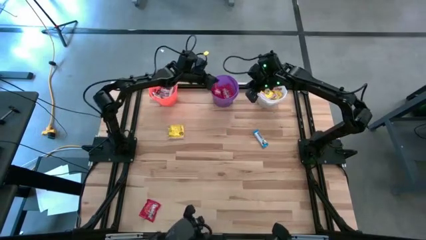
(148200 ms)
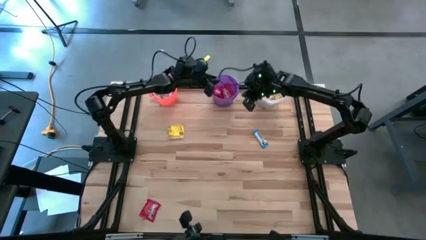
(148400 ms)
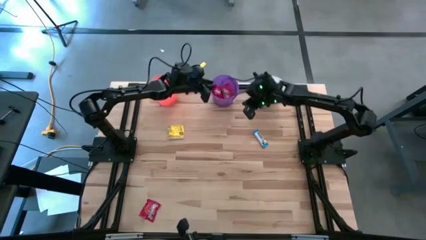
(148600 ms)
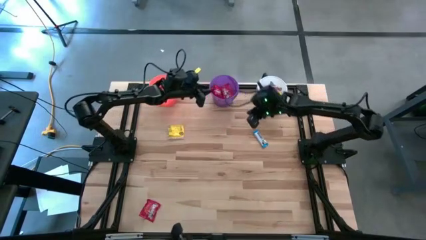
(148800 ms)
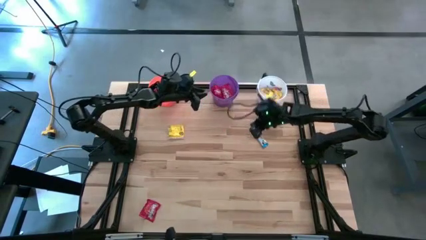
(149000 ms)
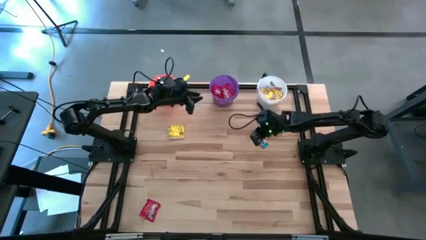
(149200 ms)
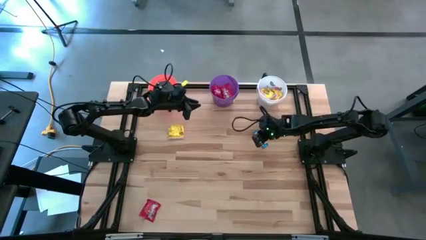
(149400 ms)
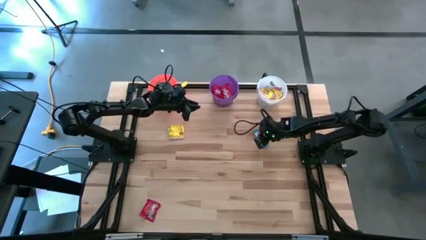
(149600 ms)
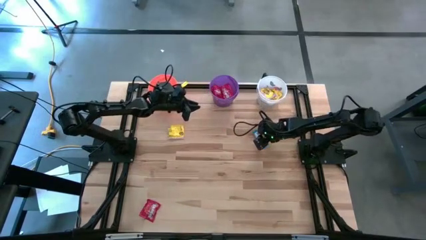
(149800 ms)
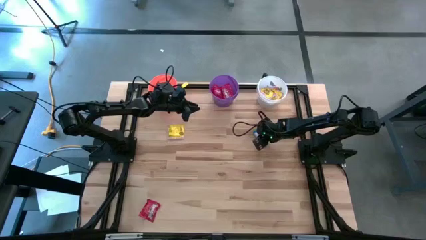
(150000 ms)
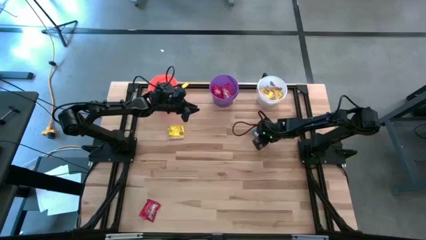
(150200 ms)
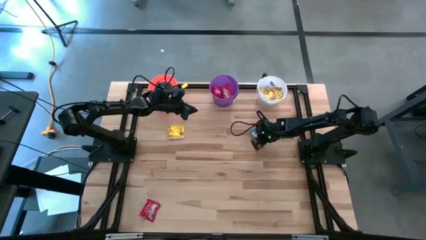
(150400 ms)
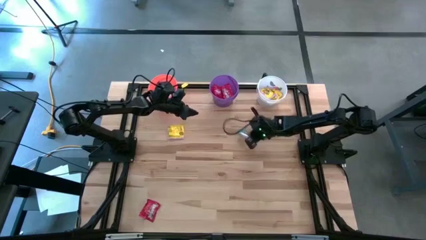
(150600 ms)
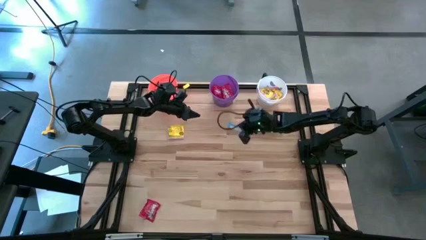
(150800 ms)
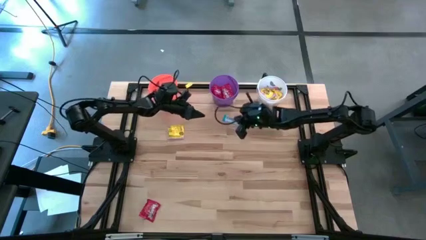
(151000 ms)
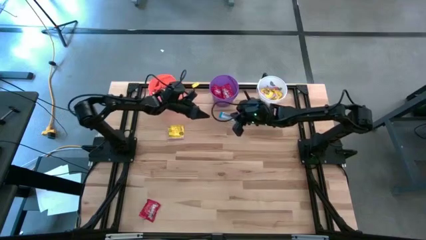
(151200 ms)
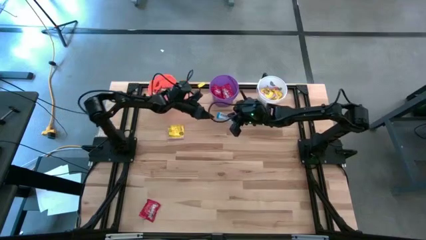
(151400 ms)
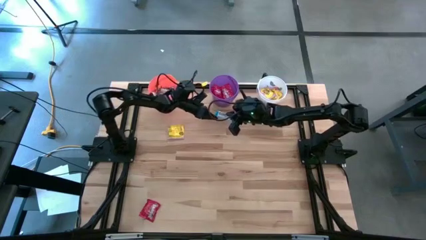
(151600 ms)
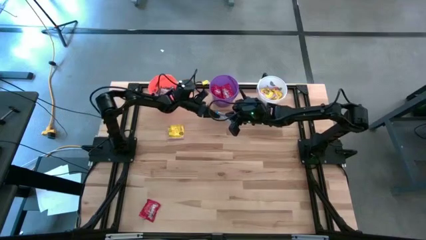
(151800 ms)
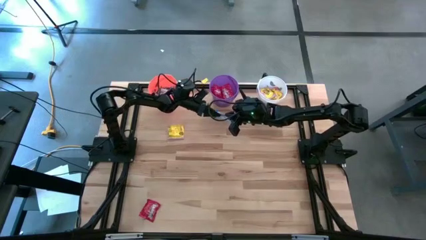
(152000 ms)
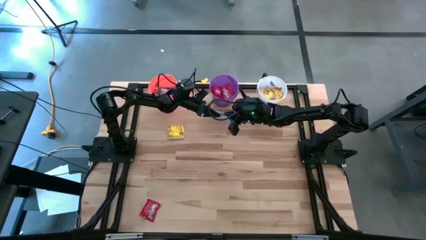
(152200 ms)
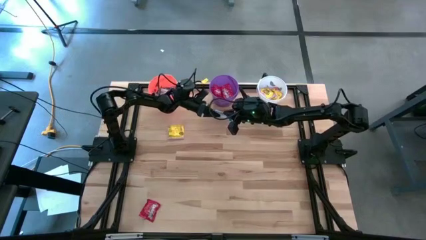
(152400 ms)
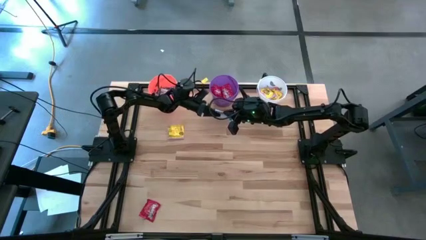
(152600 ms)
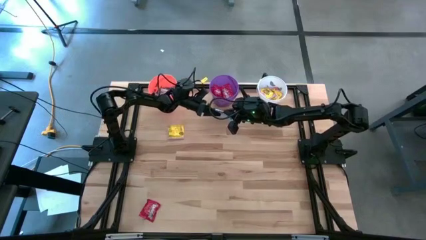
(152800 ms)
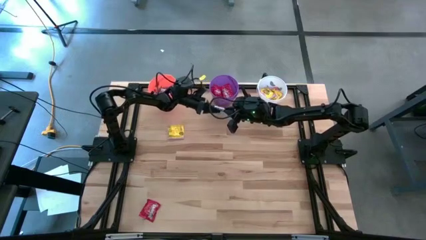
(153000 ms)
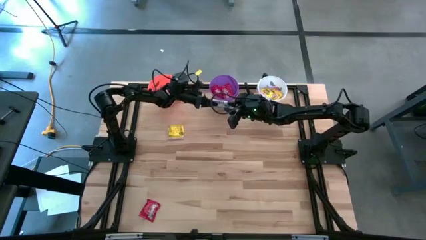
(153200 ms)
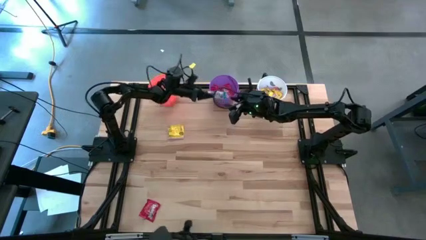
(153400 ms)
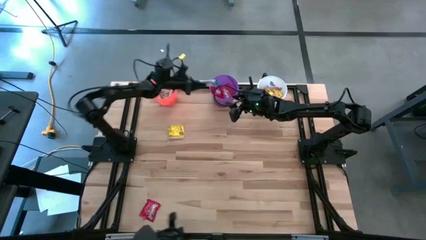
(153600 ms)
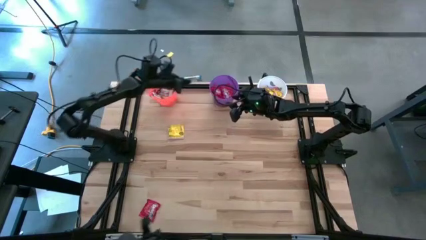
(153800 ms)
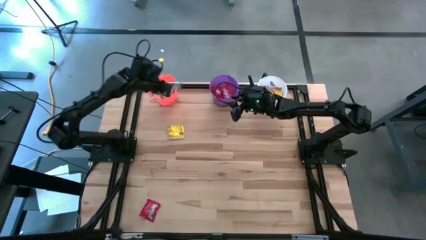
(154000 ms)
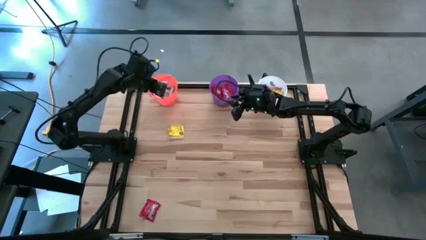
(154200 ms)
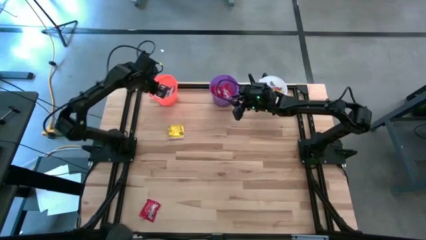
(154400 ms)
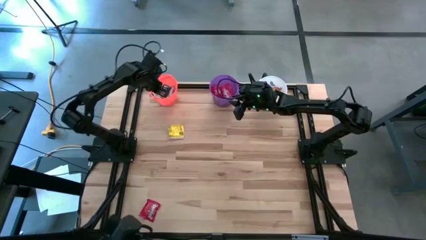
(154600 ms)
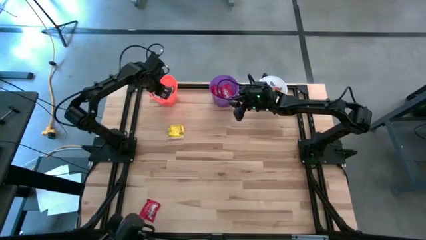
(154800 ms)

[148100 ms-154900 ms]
Task: Sort candy
Put the white chocolate bar into the orange bucket

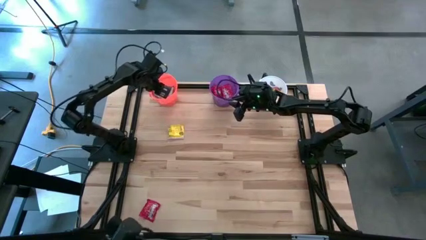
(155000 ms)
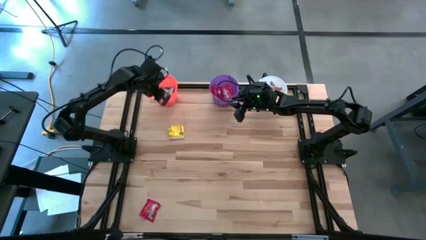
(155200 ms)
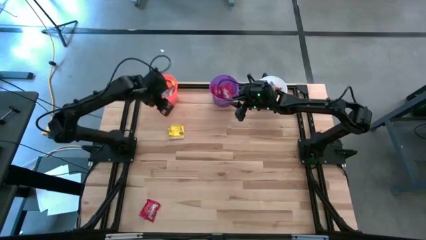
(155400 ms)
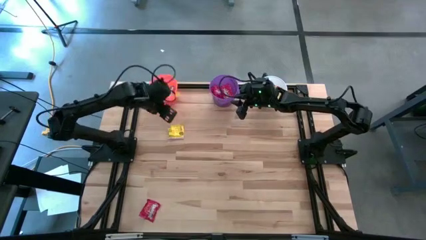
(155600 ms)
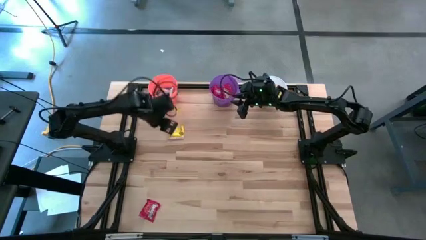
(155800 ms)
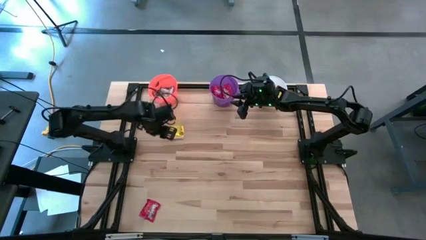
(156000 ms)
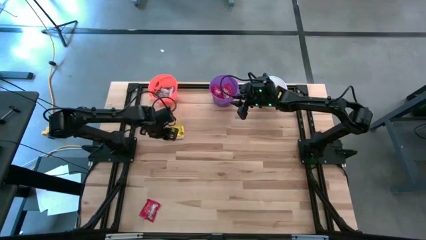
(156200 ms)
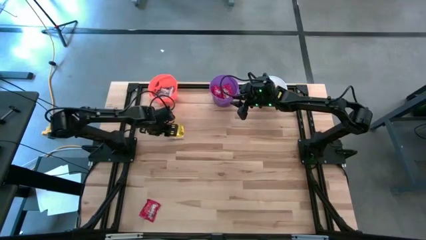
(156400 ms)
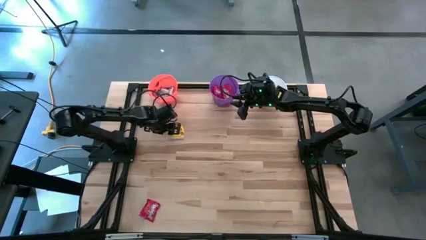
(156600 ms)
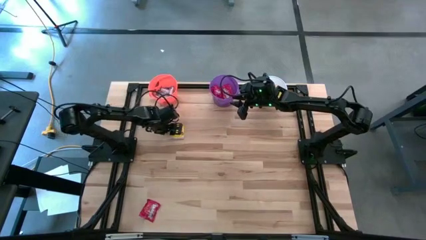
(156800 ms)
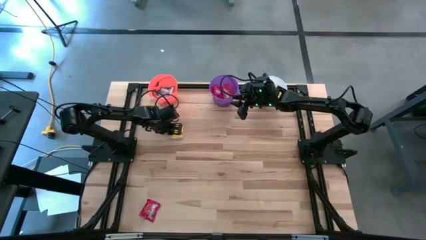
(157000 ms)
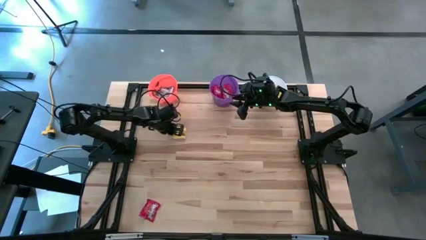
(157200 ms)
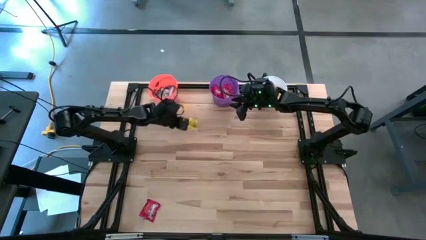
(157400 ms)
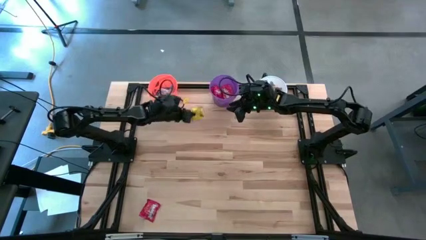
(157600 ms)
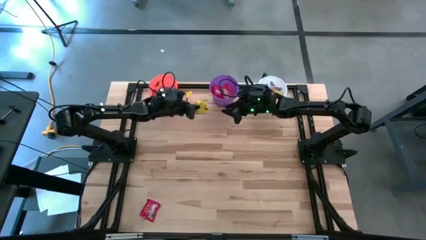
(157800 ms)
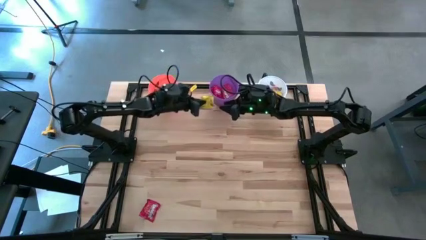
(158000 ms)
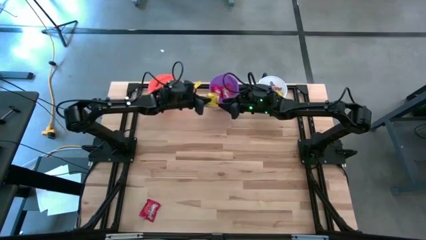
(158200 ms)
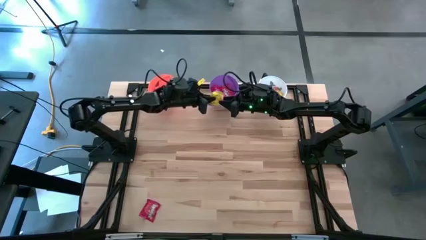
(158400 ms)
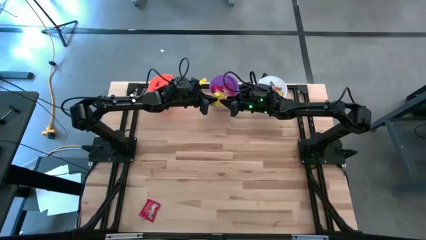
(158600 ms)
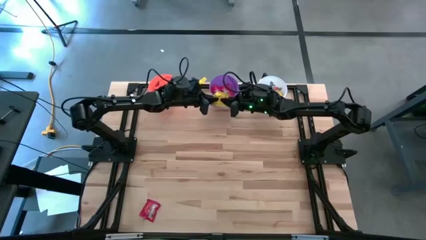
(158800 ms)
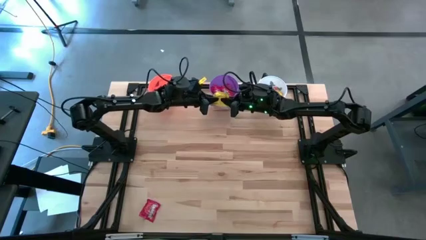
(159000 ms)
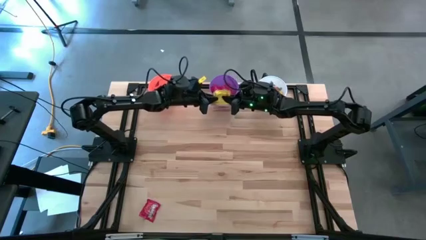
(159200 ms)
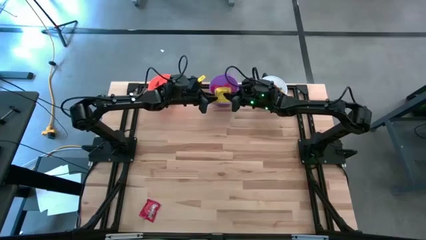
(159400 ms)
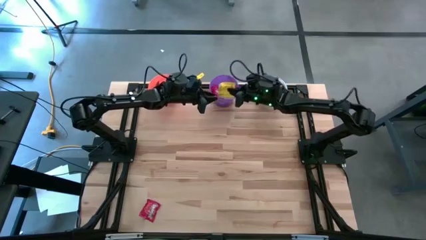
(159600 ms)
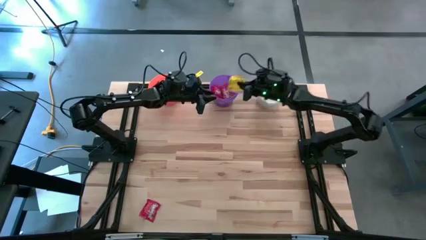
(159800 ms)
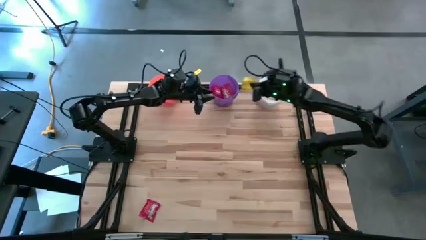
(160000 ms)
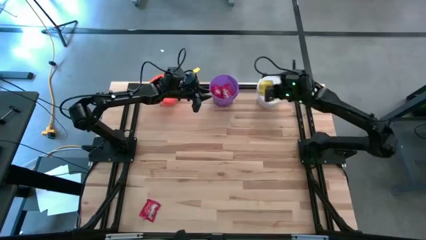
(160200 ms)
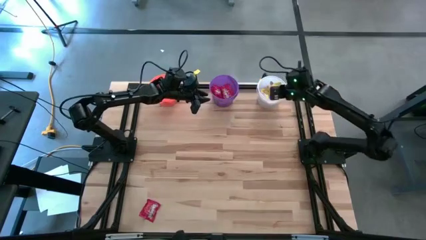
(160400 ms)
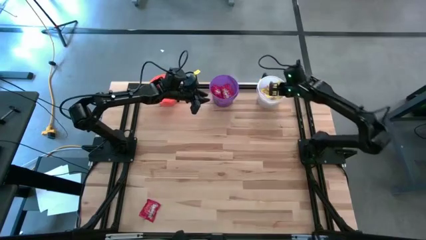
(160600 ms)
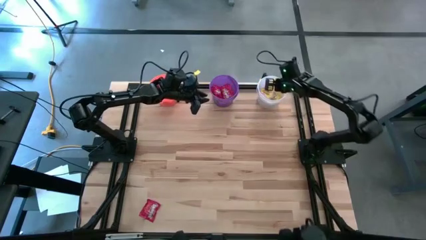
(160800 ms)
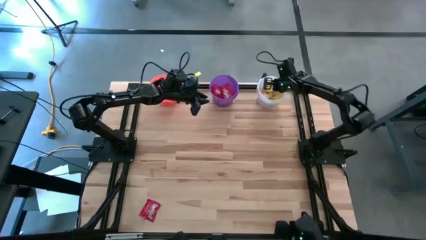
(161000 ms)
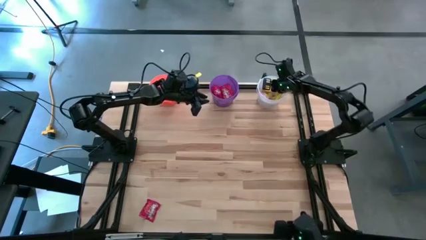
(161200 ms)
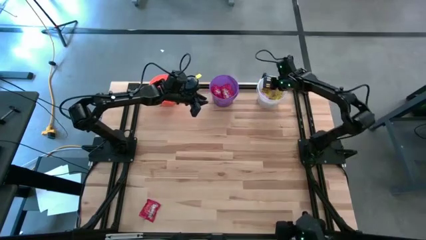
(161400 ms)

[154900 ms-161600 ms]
Put the yellow candy into the white bucket
